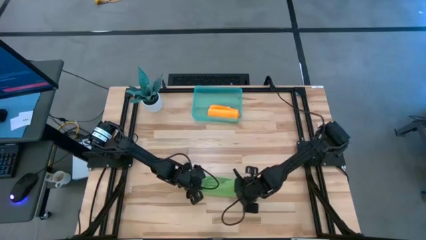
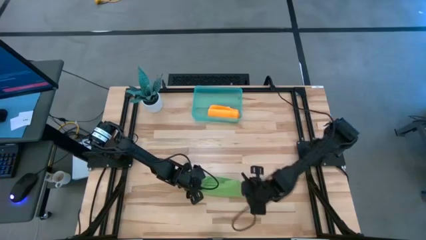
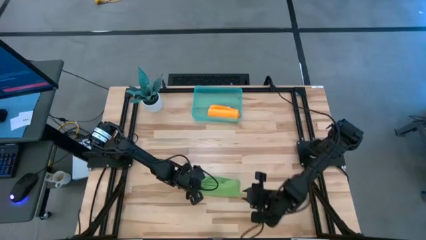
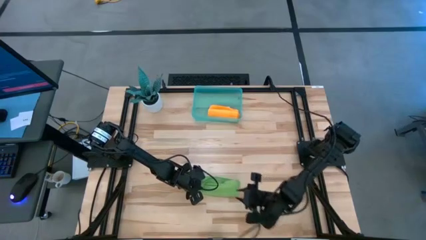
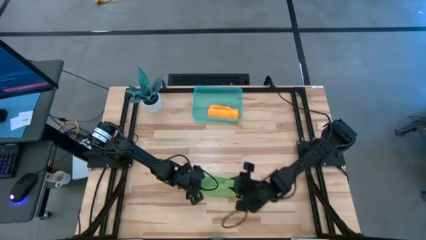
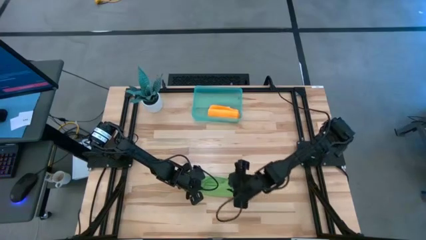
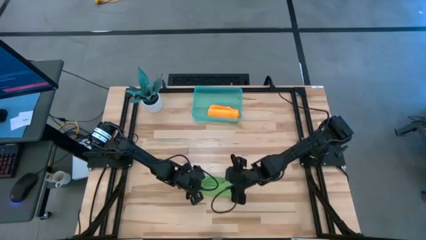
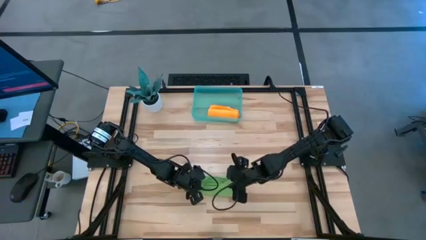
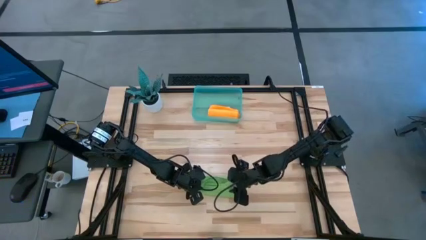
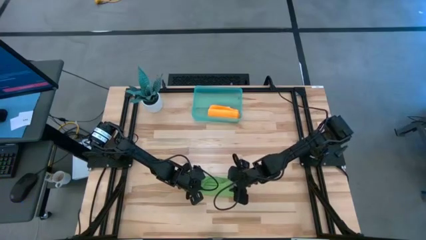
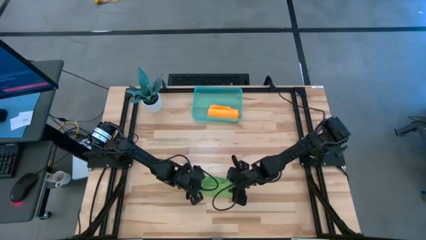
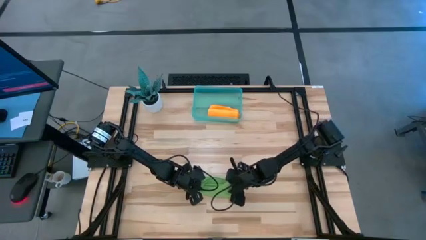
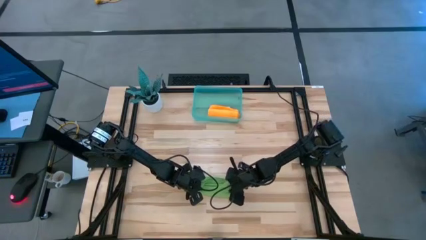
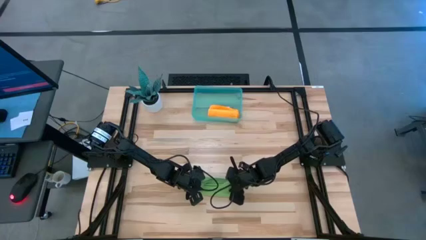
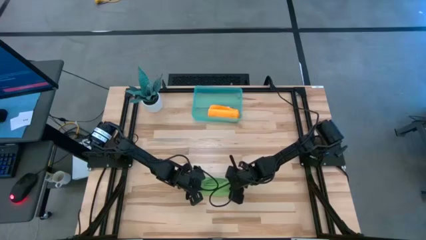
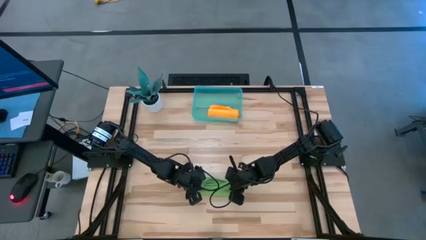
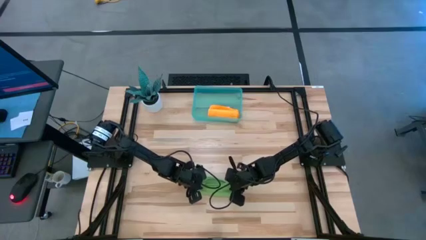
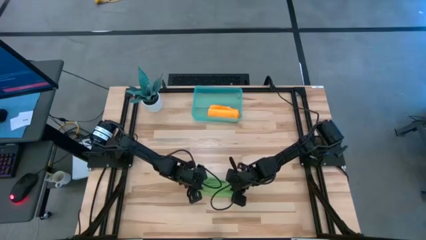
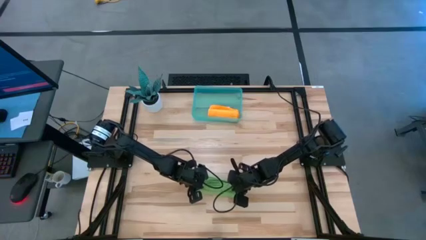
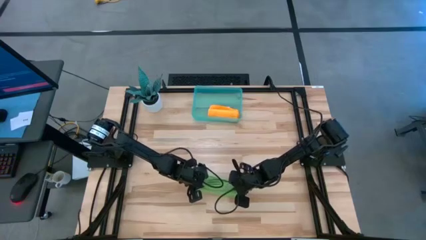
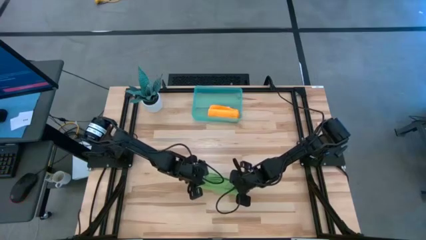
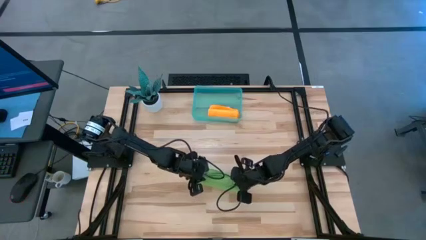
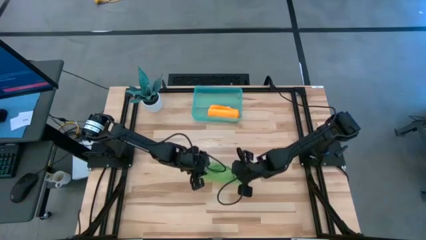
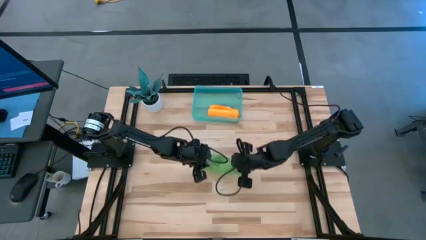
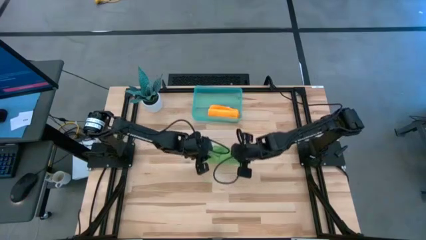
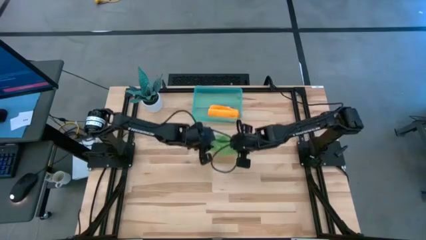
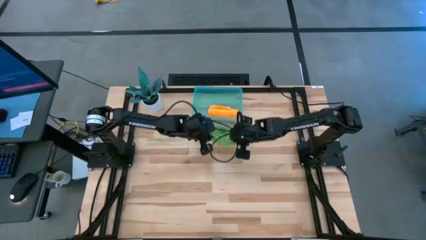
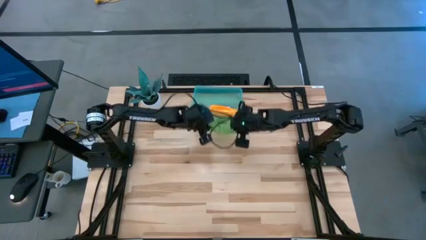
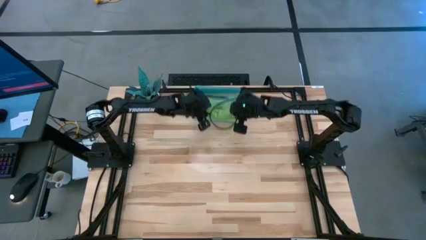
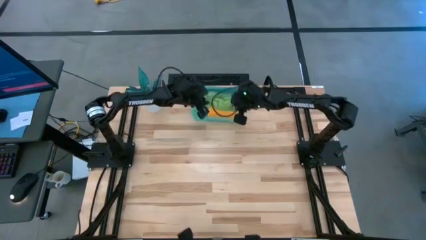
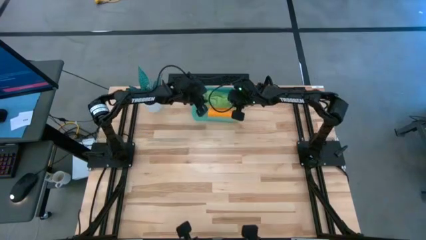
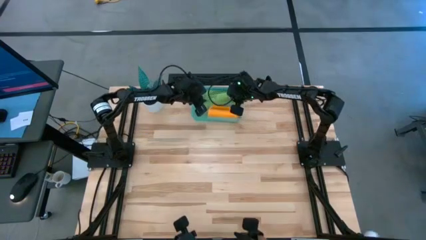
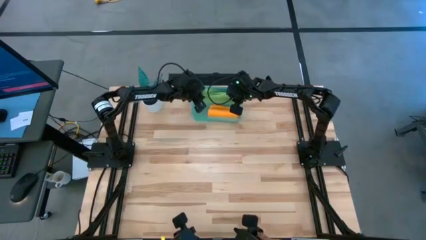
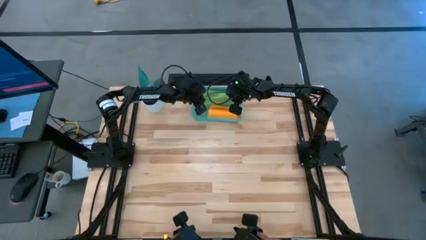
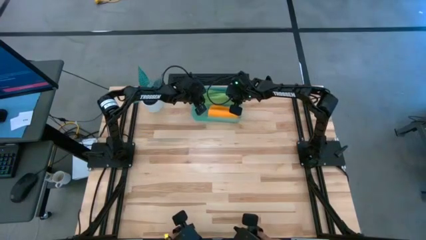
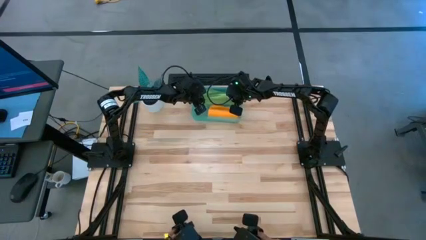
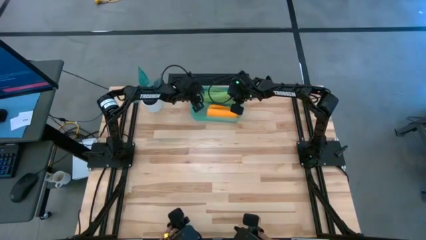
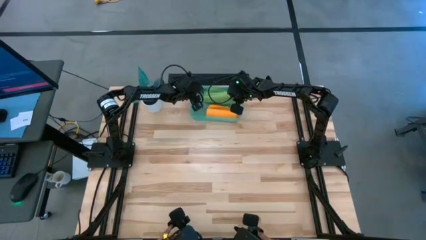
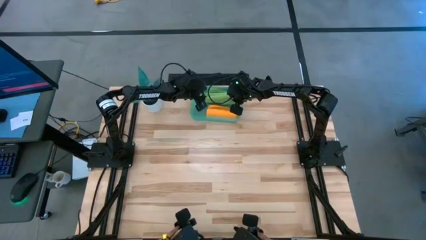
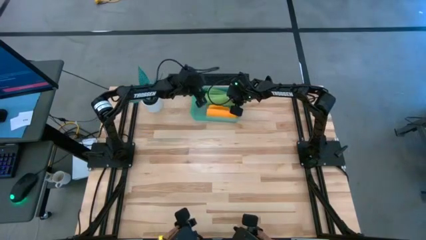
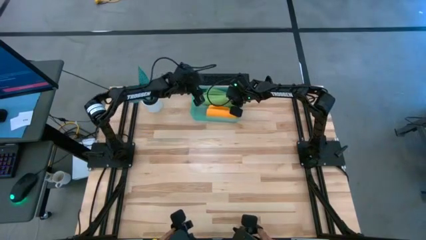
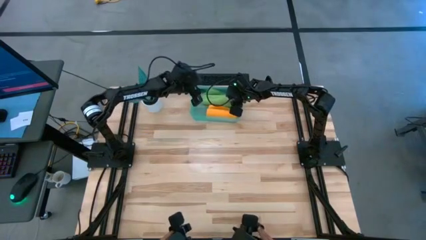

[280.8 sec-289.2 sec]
Task: Roll microfiber towels into tight, uniform cylinder then place into a basket
Put the rolled green microfiber cloth into the blue bin

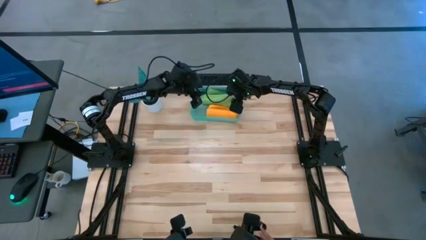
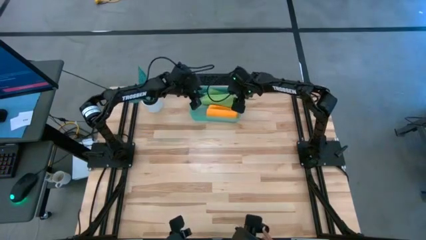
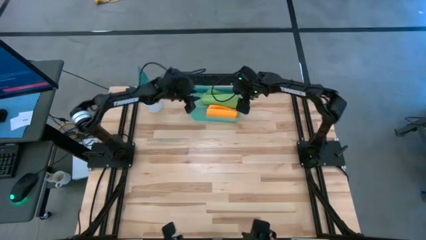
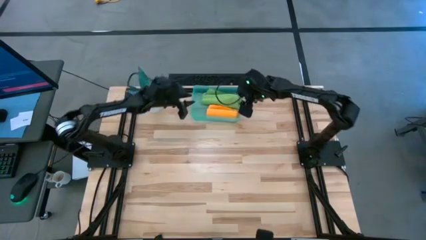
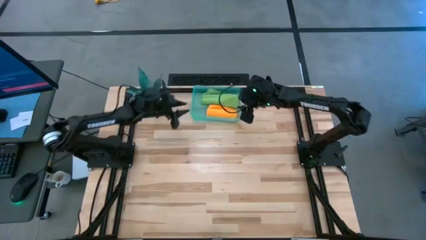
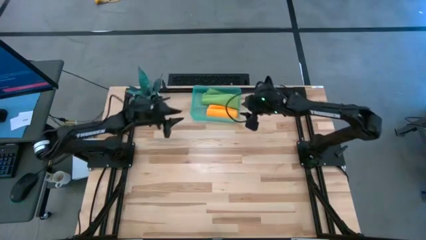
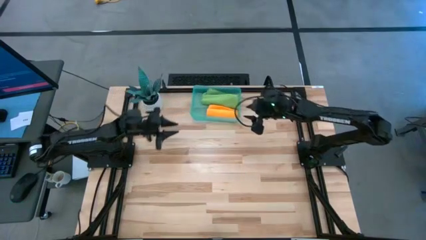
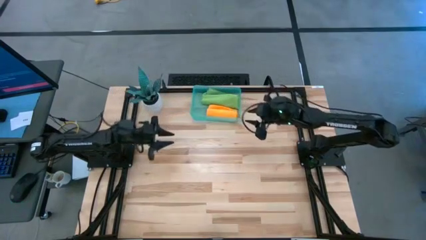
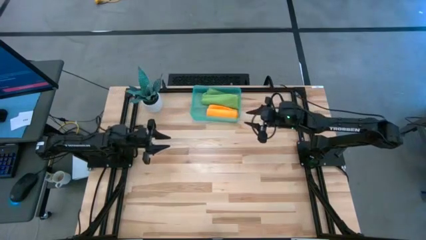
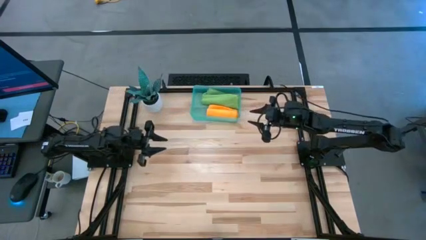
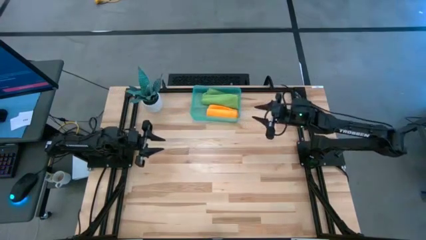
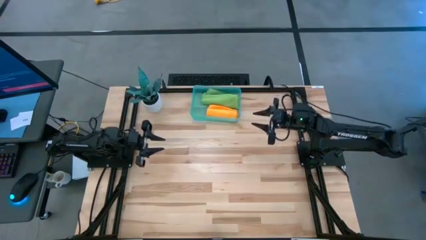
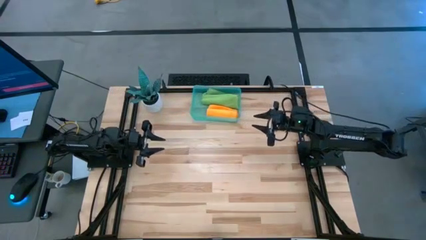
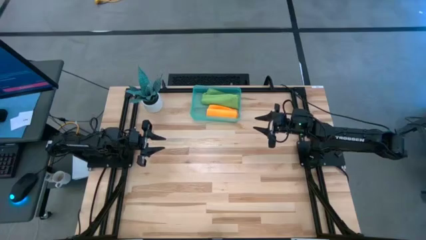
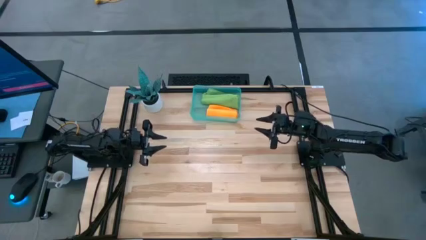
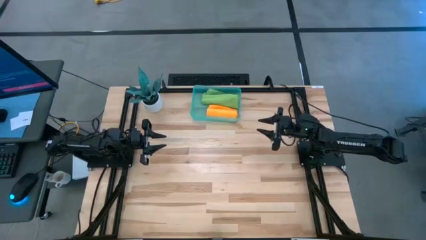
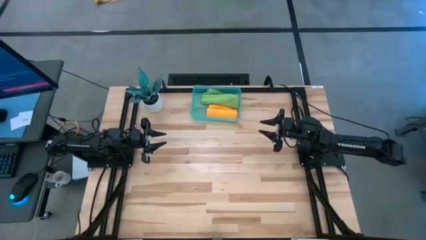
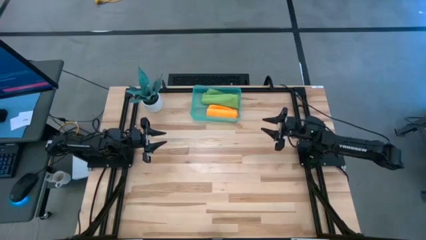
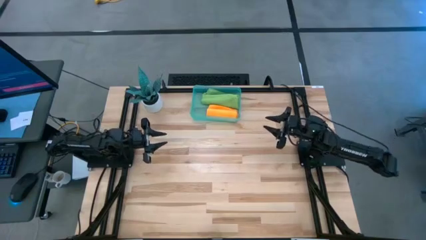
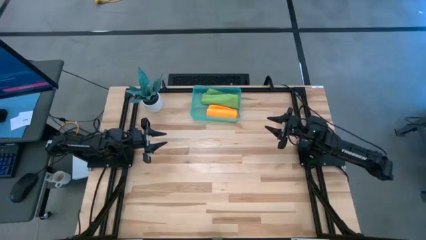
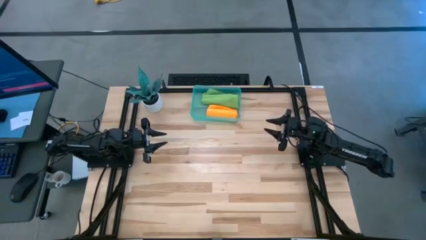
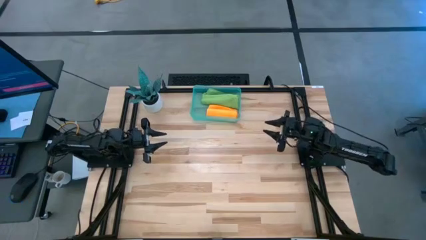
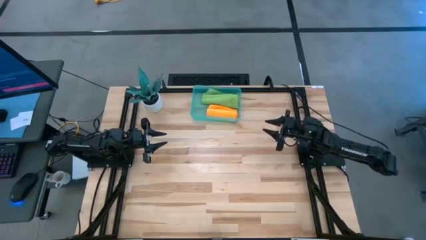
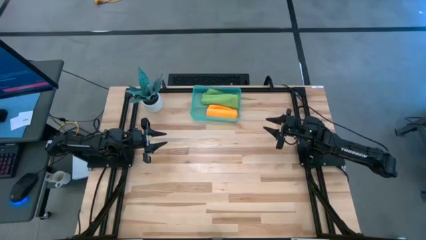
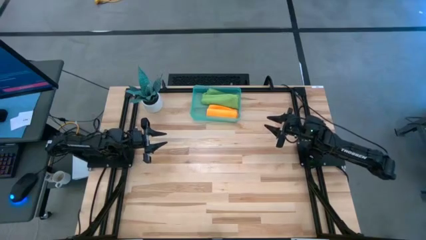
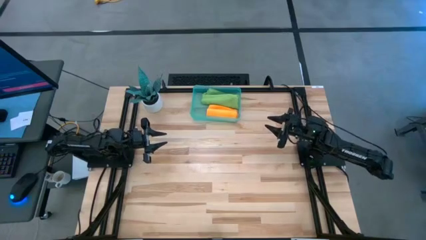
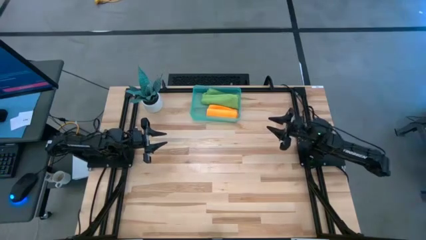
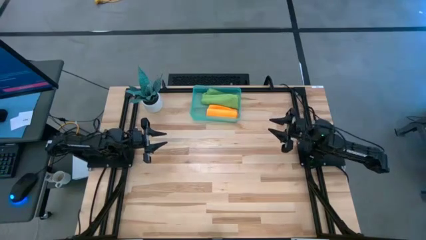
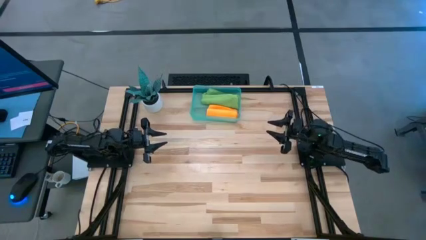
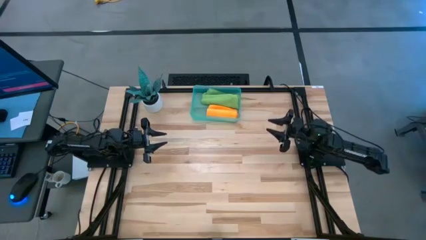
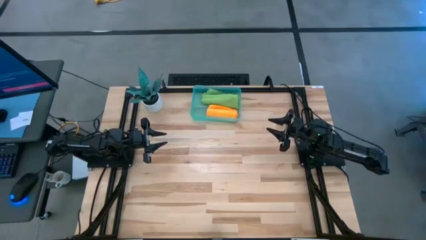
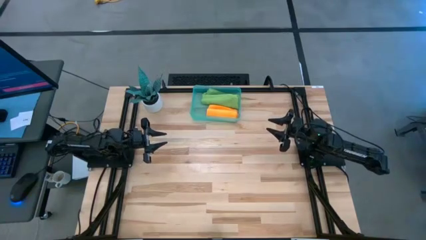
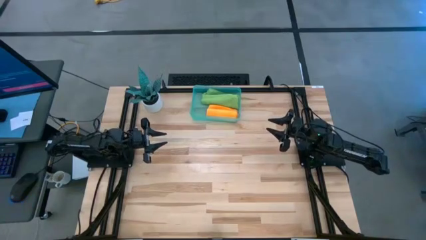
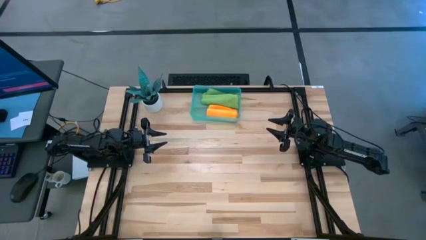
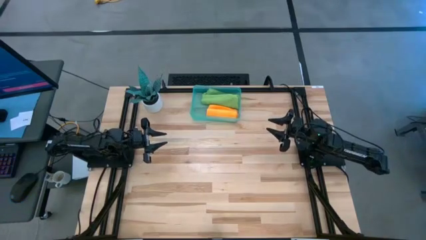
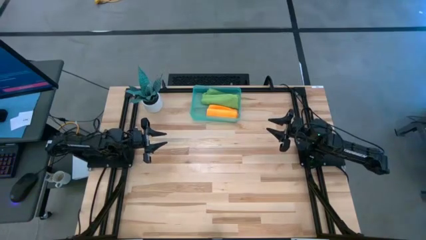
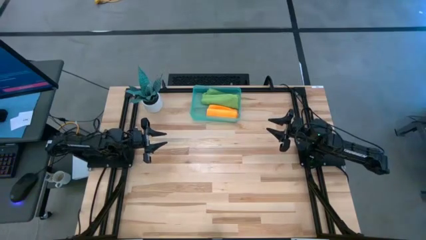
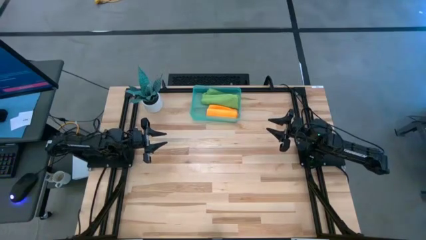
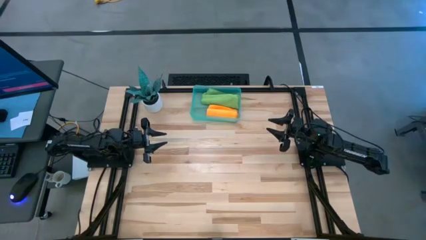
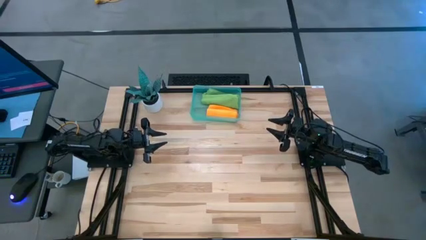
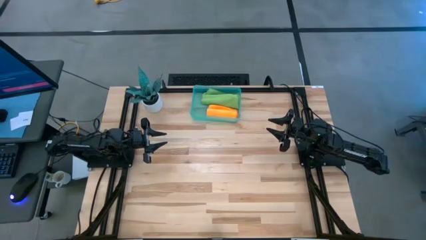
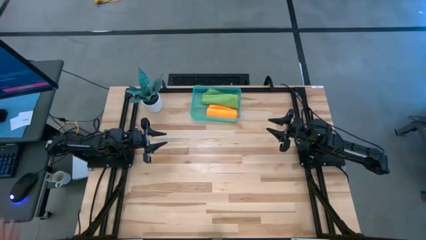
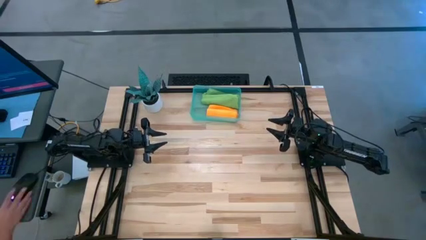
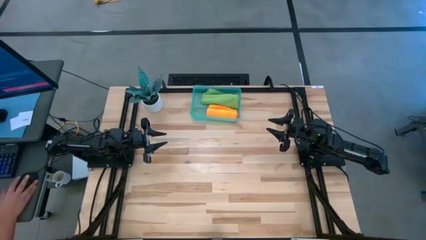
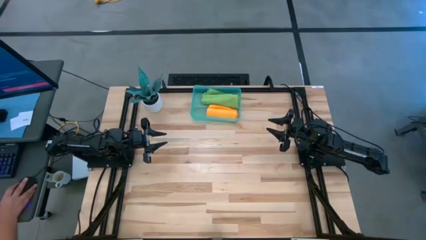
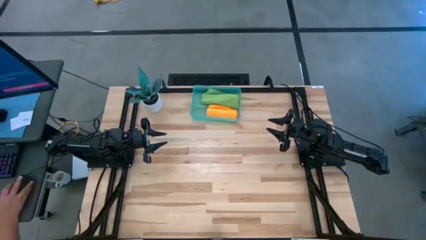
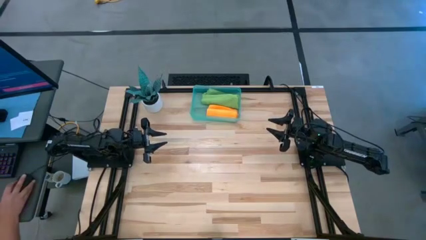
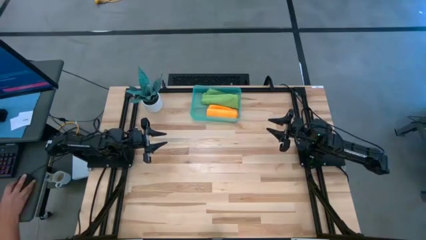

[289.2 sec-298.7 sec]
Return to Home Position
